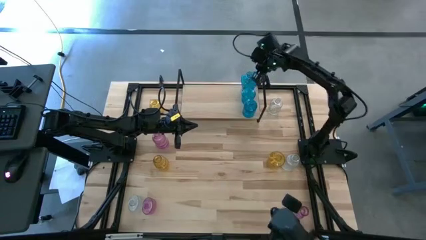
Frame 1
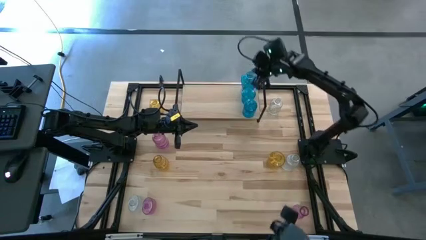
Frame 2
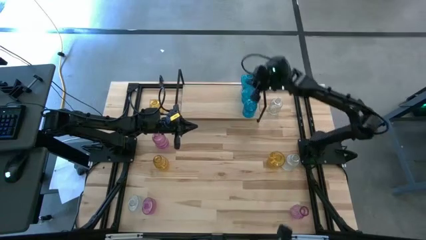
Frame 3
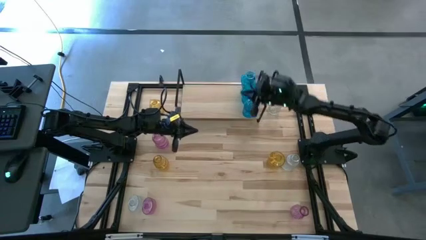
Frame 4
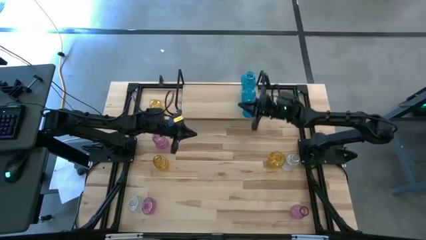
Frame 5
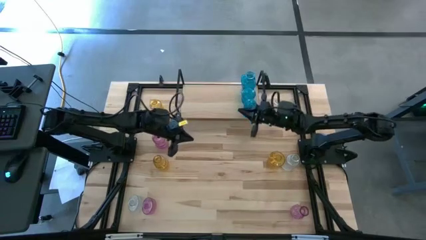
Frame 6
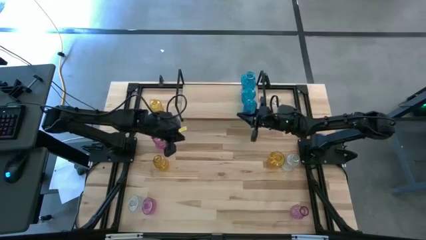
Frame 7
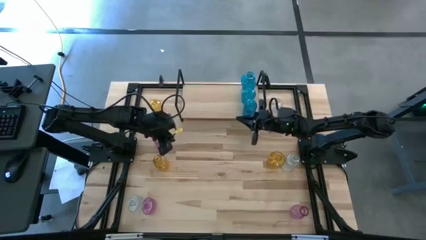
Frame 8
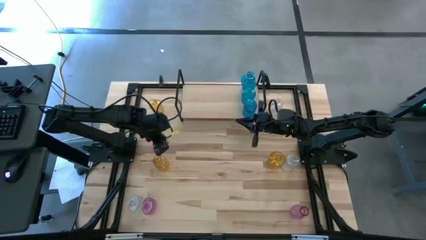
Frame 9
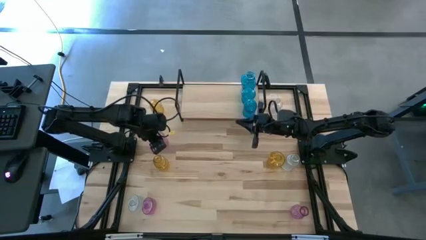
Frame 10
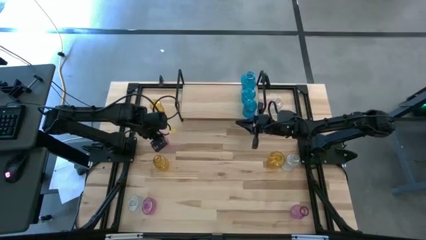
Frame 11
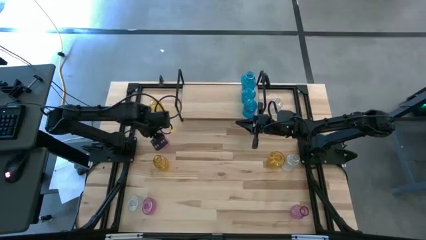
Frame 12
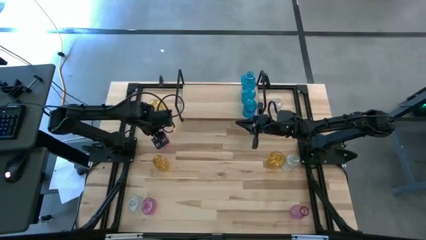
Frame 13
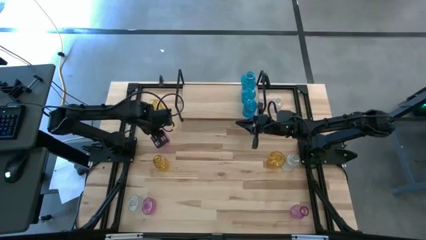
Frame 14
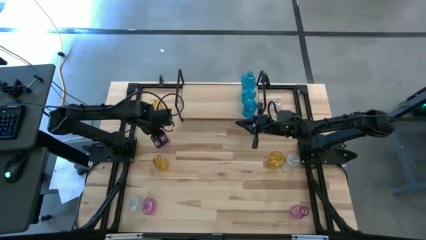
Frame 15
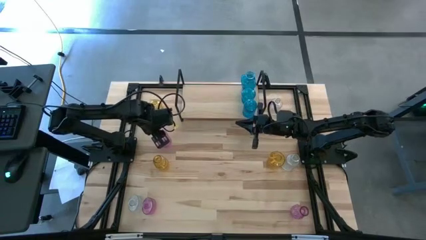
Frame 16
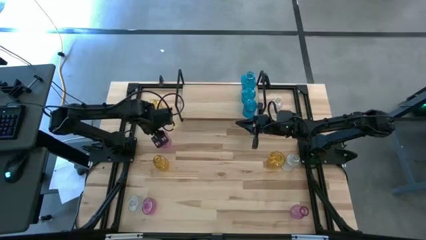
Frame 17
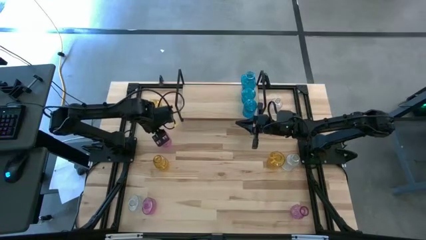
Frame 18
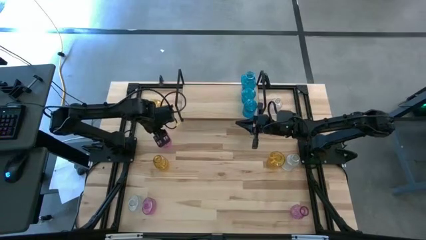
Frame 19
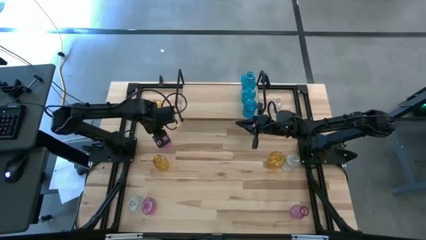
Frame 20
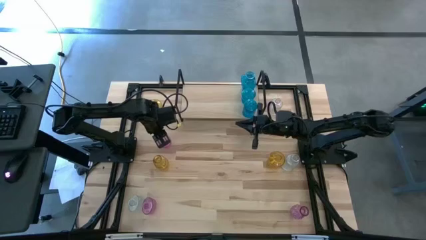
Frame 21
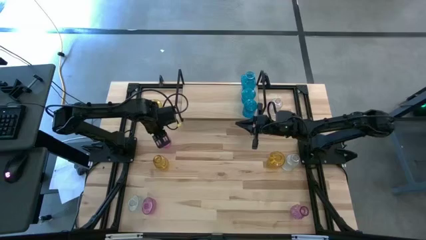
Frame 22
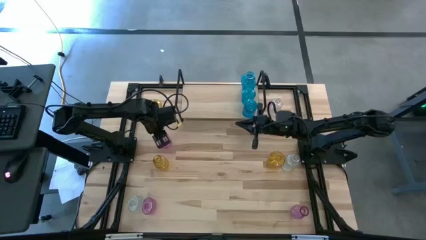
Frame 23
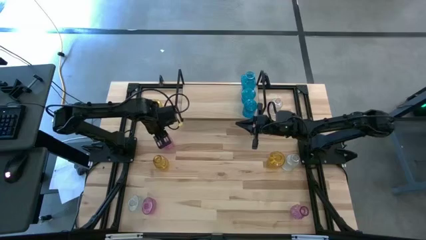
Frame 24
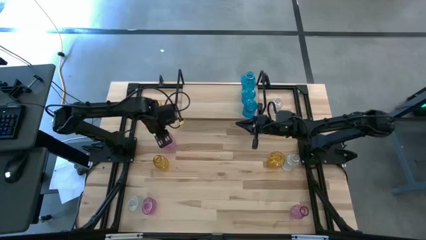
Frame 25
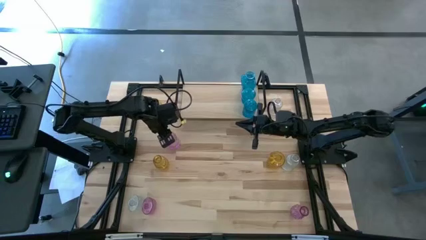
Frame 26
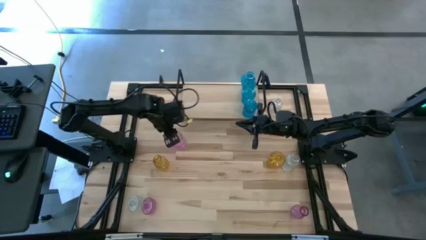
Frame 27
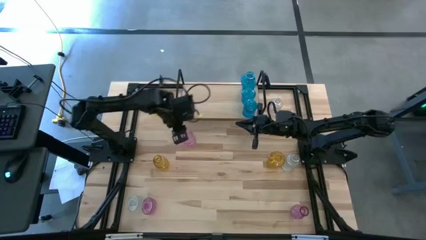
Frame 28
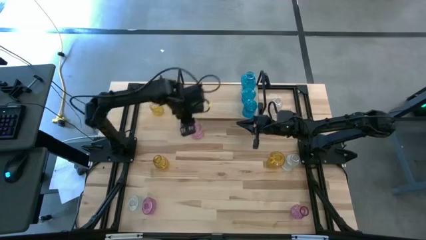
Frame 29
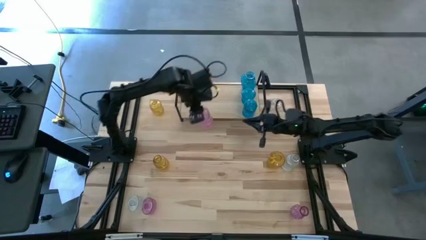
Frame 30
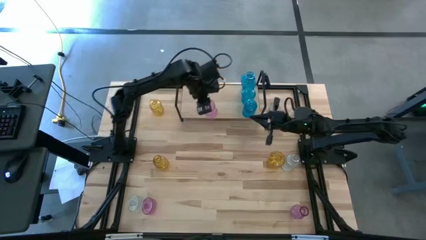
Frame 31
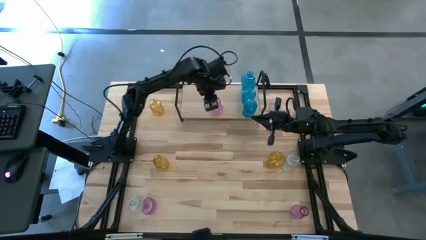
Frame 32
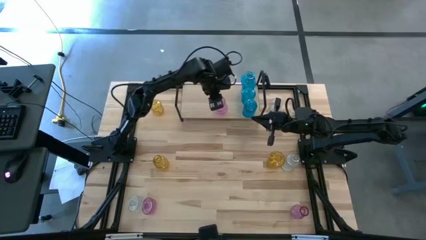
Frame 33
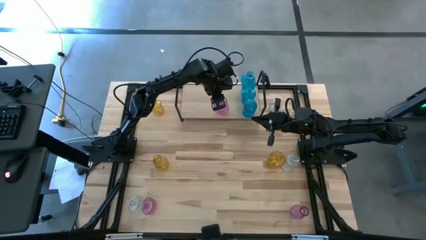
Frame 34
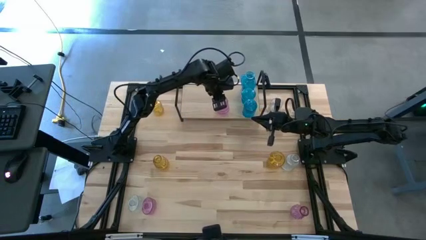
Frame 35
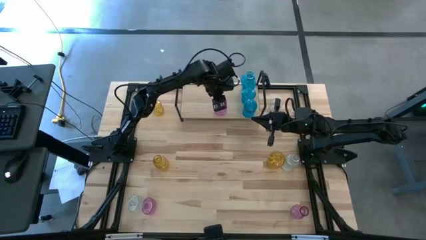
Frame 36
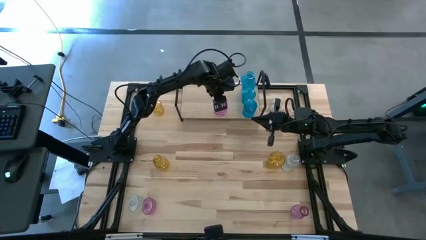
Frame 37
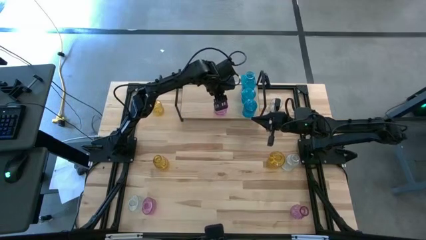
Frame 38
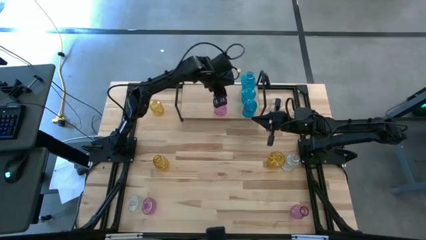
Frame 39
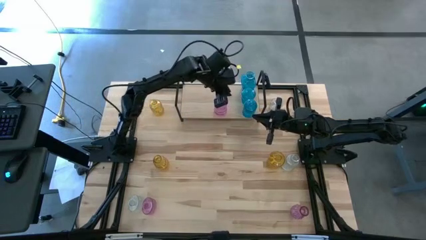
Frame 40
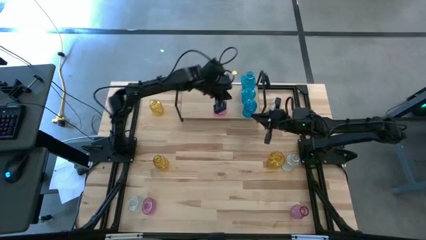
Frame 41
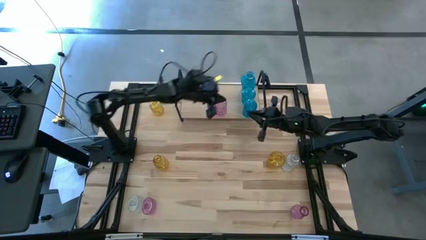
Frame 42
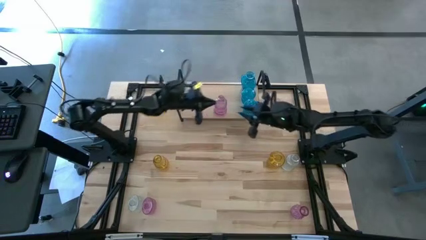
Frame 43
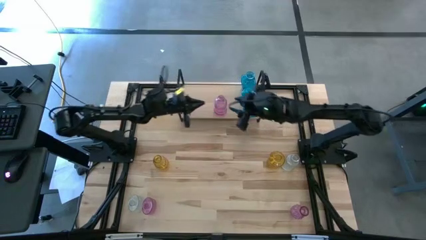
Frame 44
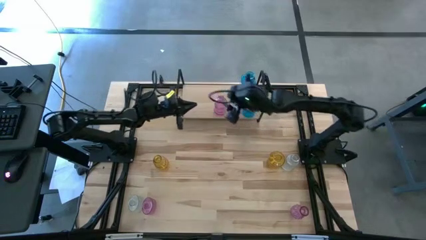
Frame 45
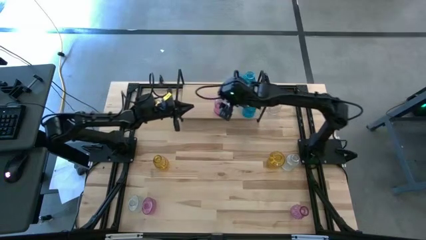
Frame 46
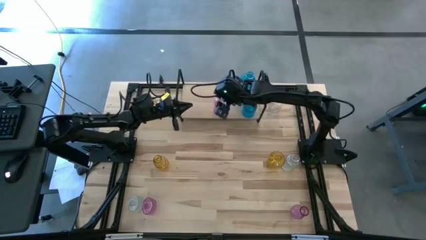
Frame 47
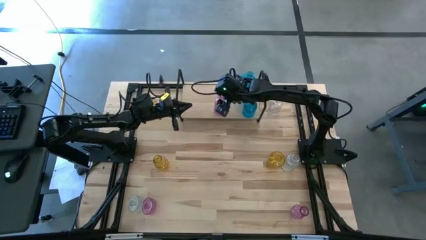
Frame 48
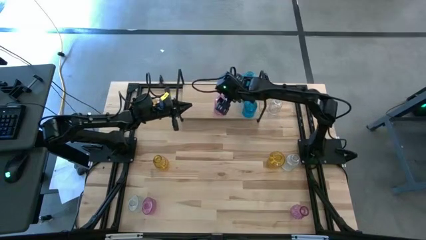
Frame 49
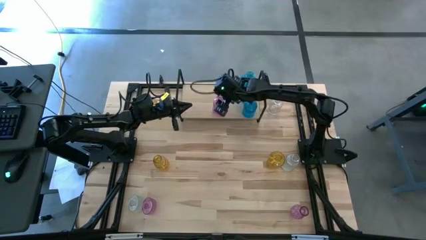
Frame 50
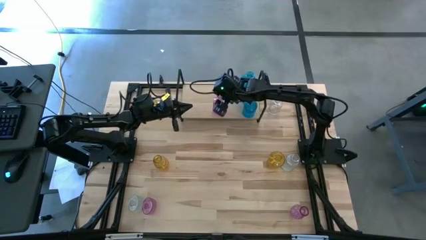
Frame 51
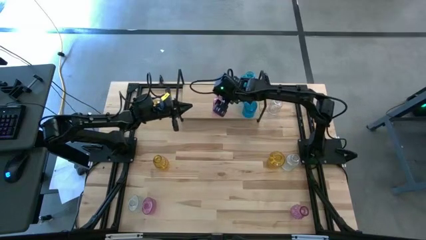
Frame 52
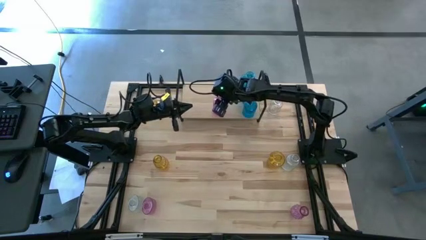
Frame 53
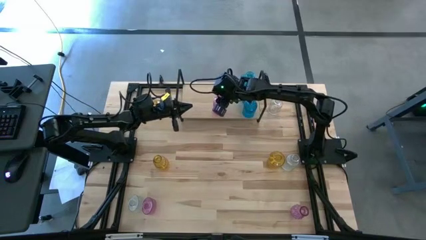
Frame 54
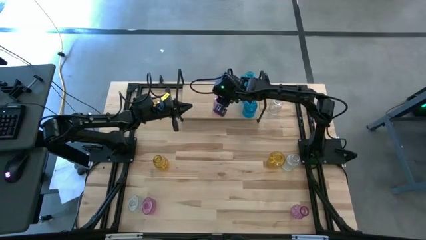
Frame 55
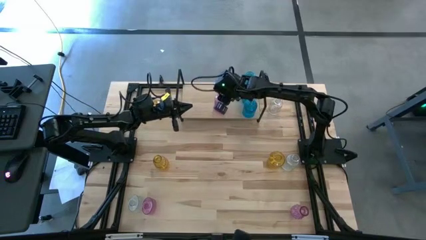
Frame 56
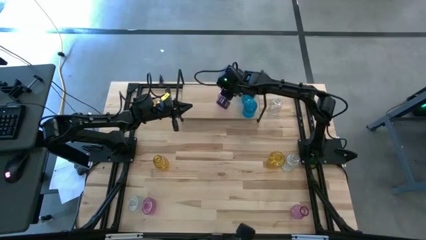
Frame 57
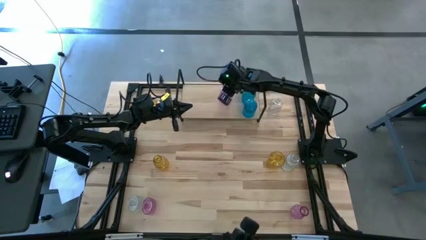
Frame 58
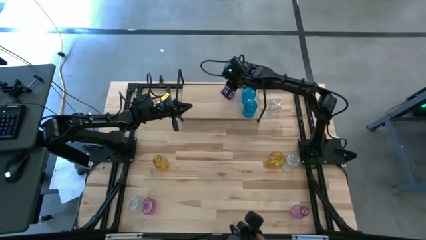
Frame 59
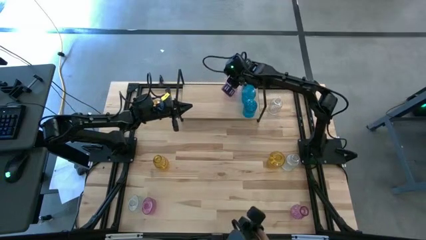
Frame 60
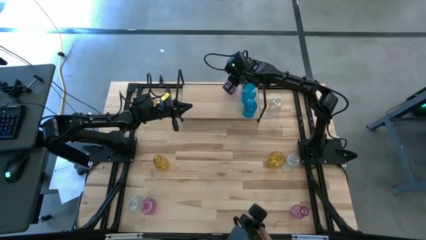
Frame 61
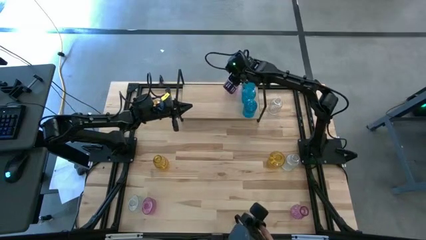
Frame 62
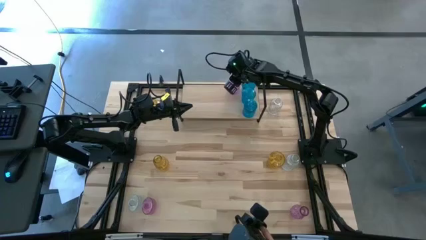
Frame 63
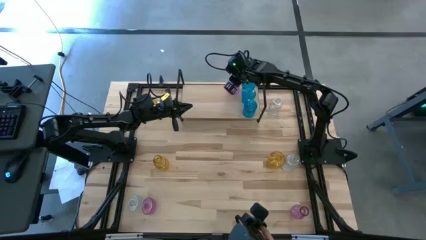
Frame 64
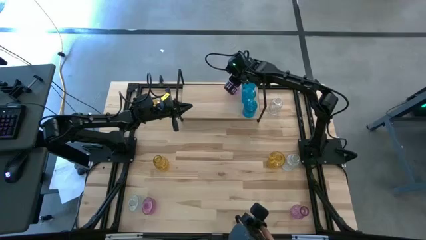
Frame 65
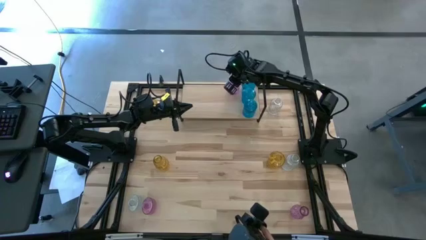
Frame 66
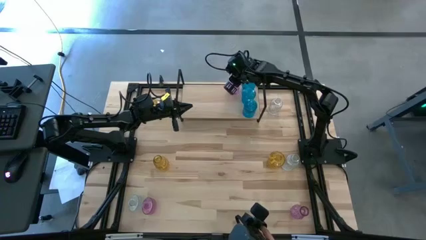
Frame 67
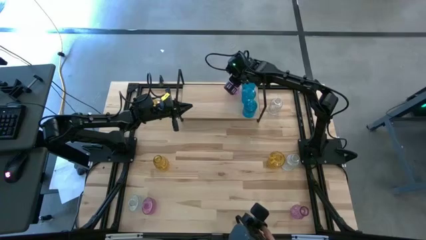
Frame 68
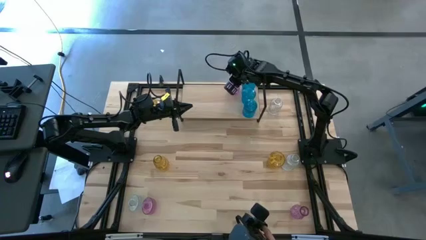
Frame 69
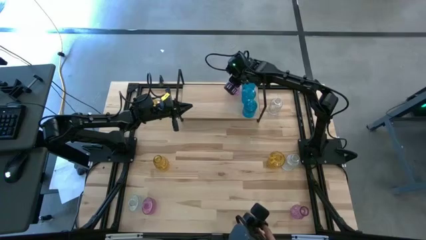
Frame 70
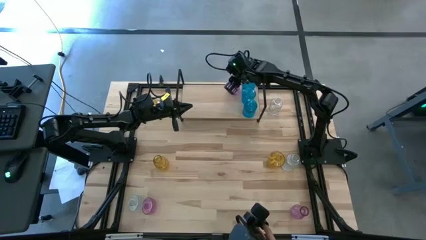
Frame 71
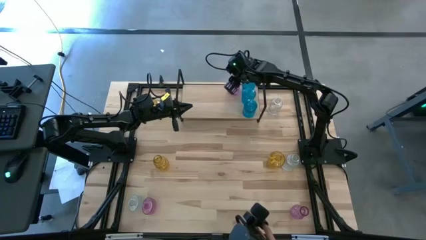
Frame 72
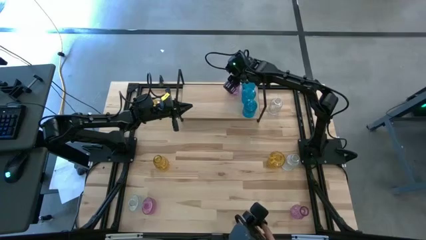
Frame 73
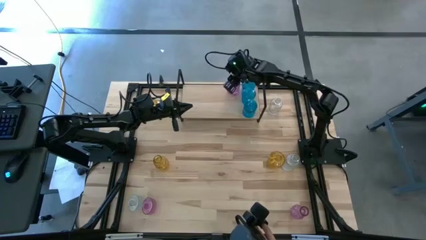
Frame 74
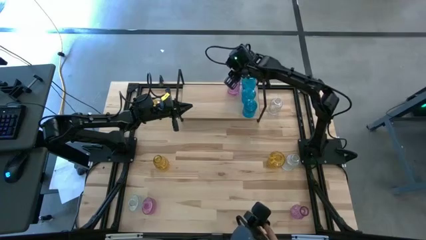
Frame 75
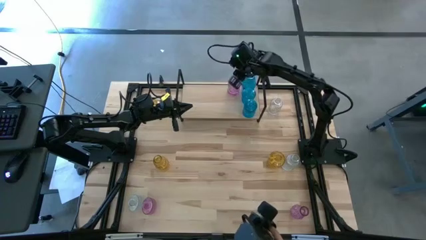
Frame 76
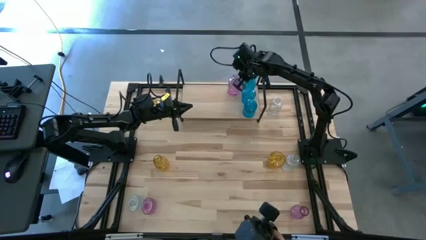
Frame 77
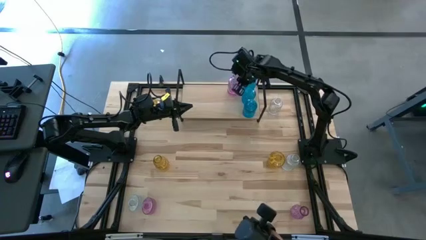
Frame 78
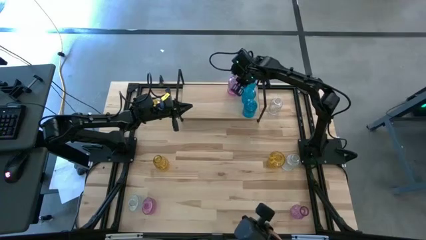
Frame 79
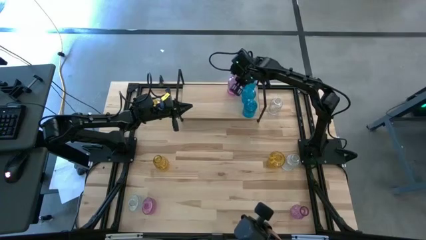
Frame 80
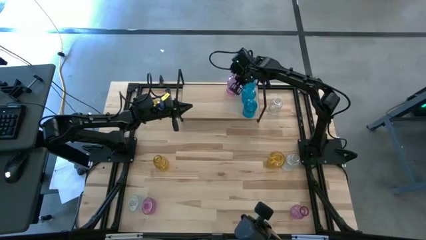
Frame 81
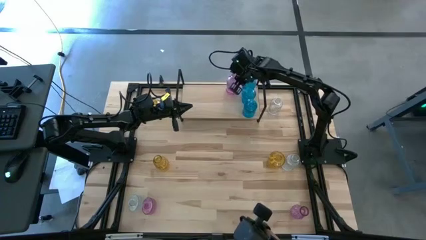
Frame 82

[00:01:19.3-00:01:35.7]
Task: sort vases onto shelf
Put the top purple vase on the shelf

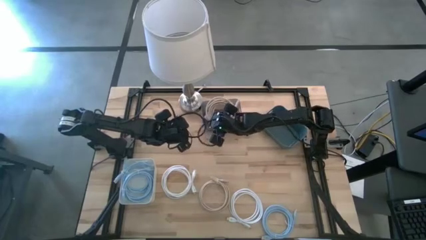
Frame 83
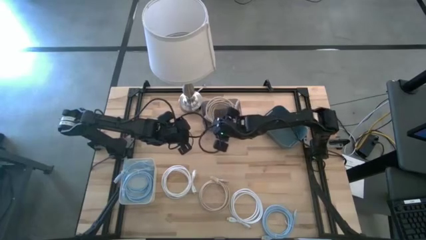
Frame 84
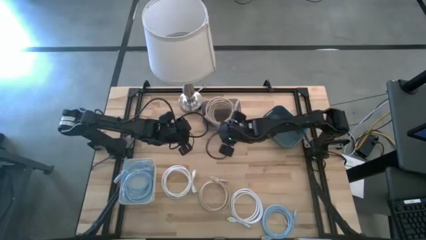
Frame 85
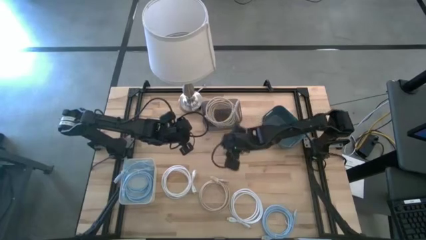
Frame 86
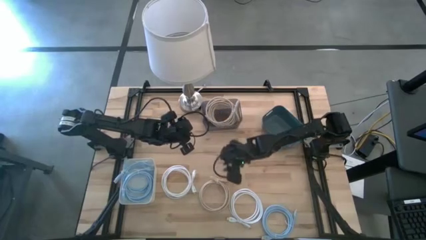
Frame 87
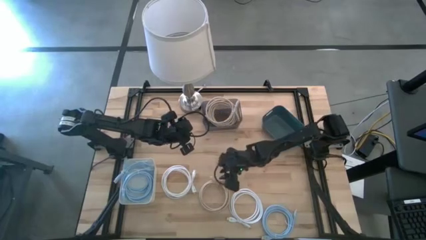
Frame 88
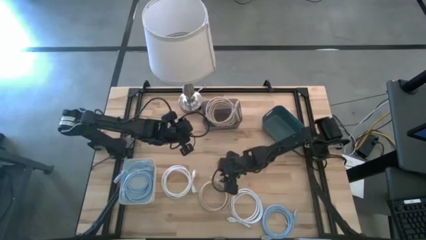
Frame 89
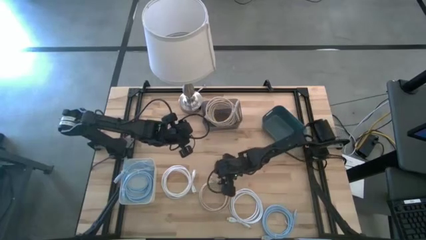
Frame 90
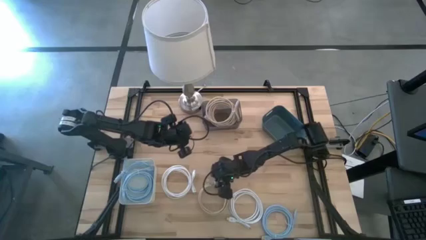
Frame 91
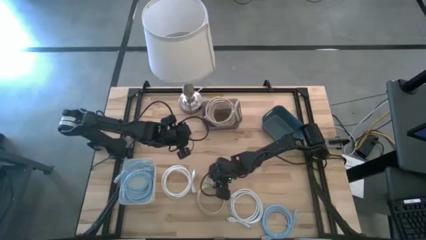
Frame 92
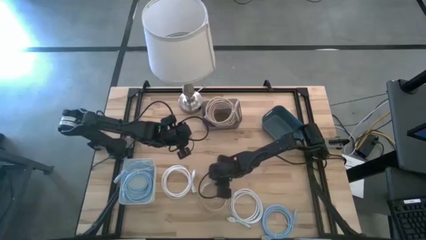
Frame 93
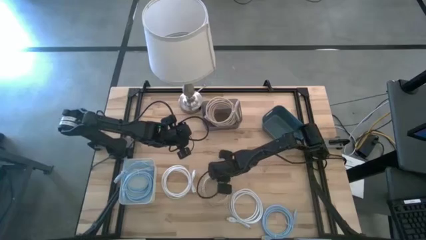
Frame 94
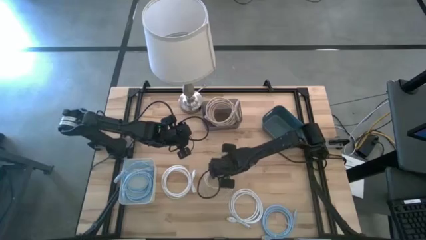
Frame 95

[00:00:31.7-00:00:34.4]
Task: Sort HDMI cables
Put the light brown HDMI cable into the black bin
